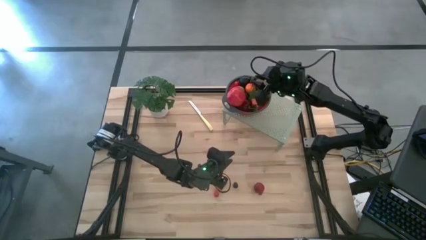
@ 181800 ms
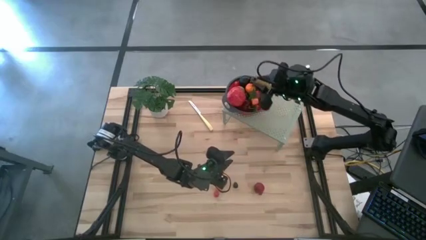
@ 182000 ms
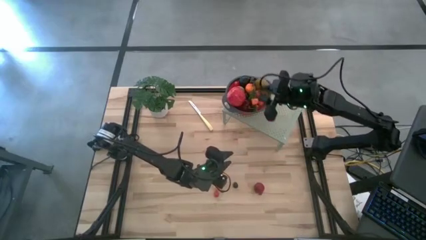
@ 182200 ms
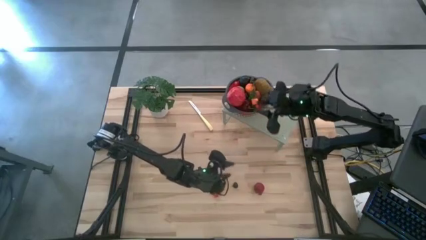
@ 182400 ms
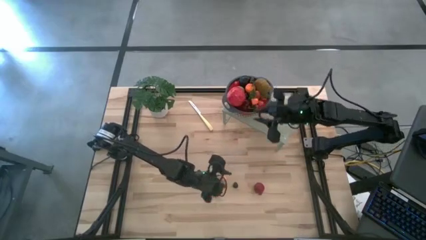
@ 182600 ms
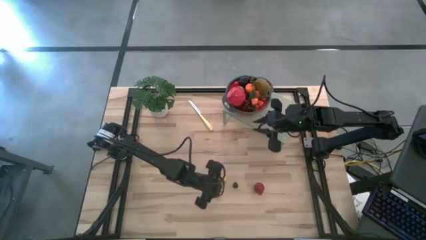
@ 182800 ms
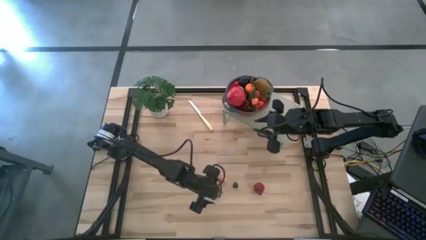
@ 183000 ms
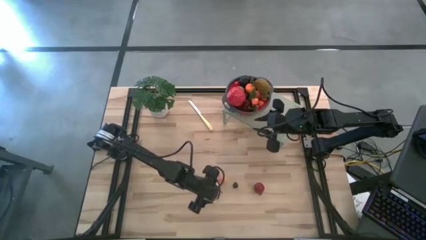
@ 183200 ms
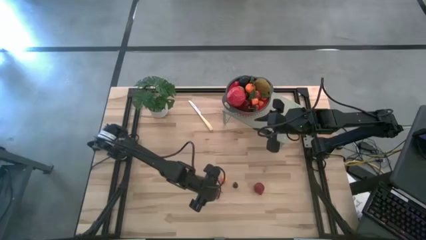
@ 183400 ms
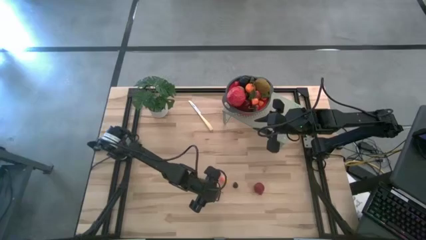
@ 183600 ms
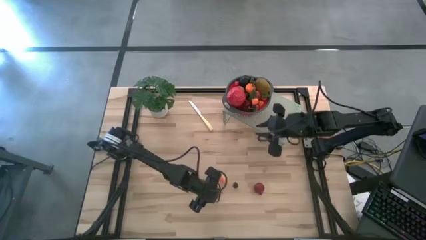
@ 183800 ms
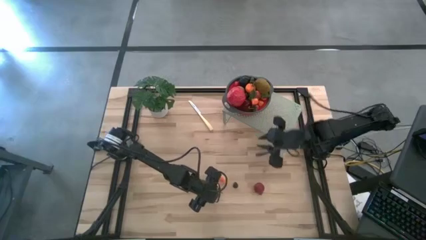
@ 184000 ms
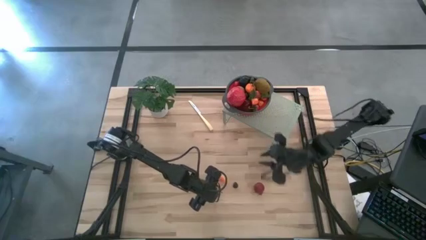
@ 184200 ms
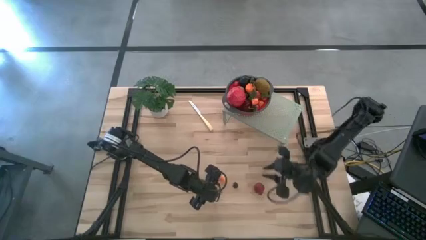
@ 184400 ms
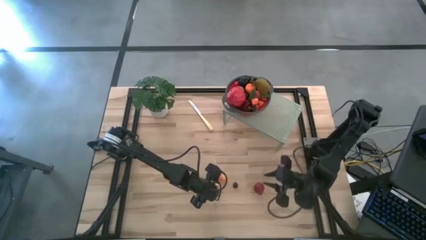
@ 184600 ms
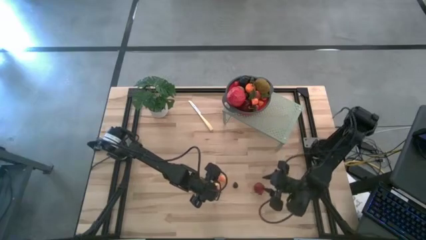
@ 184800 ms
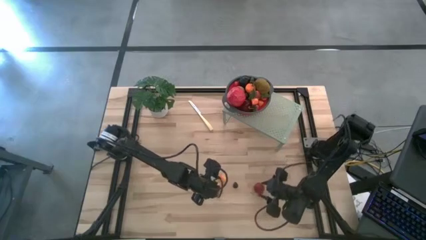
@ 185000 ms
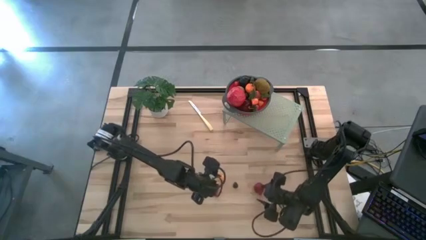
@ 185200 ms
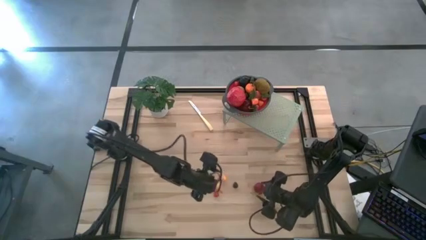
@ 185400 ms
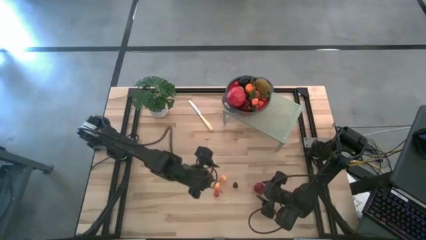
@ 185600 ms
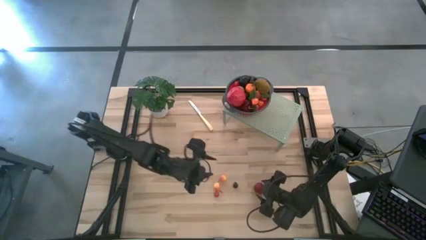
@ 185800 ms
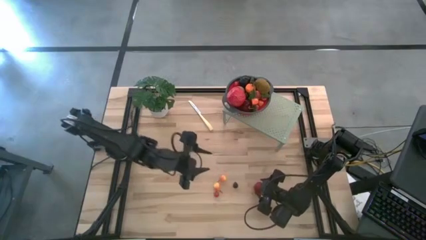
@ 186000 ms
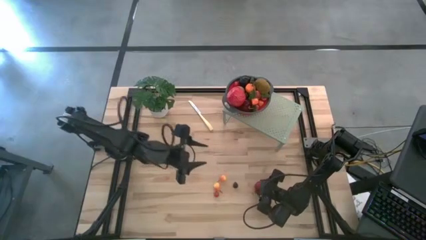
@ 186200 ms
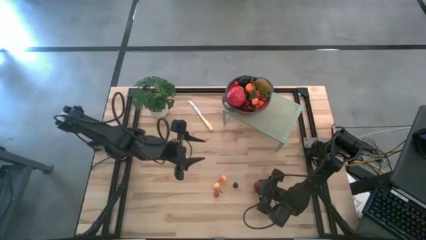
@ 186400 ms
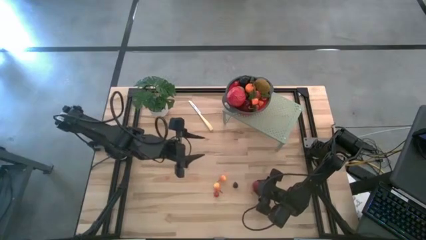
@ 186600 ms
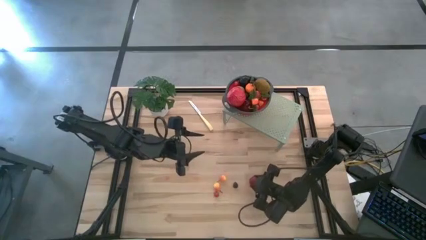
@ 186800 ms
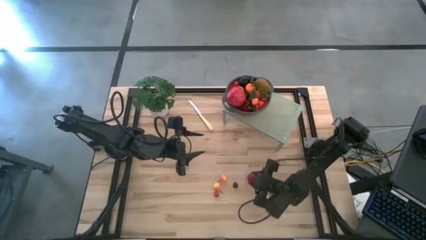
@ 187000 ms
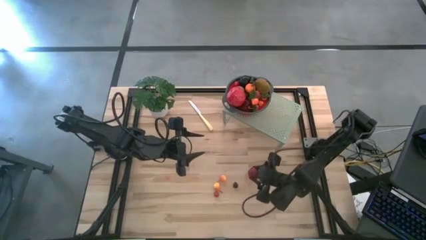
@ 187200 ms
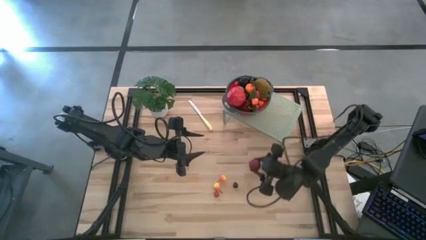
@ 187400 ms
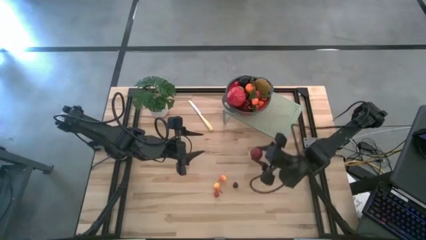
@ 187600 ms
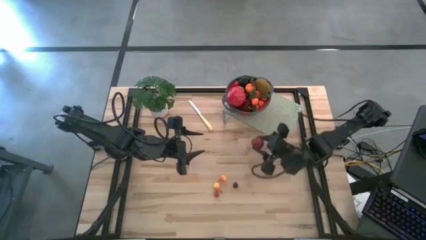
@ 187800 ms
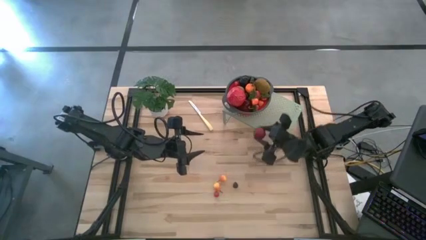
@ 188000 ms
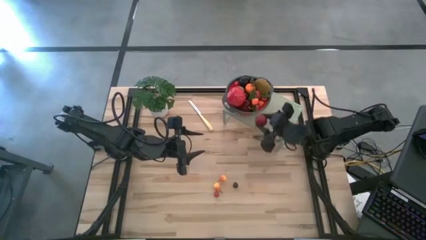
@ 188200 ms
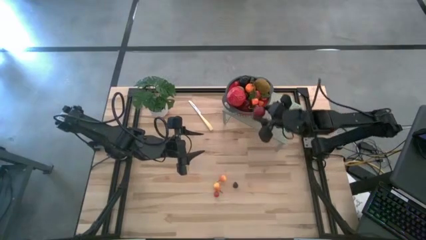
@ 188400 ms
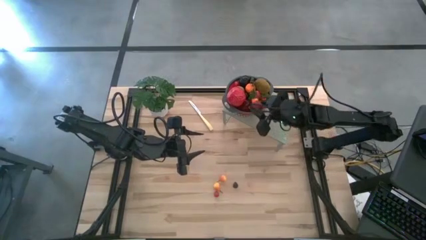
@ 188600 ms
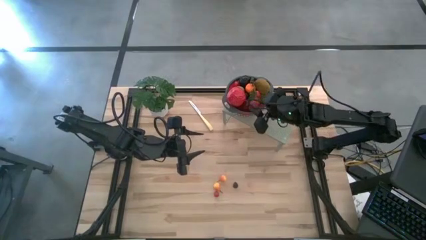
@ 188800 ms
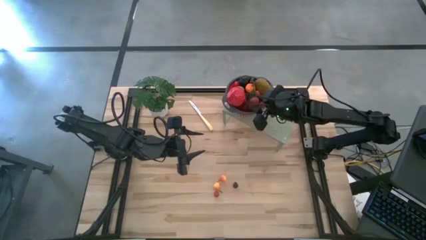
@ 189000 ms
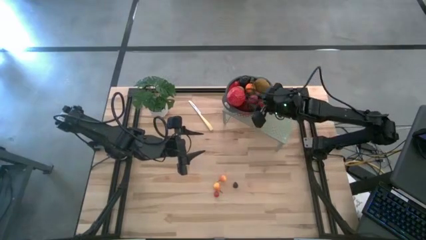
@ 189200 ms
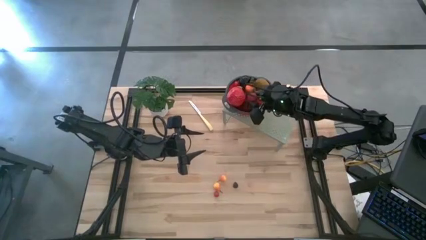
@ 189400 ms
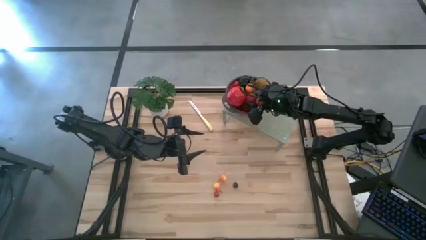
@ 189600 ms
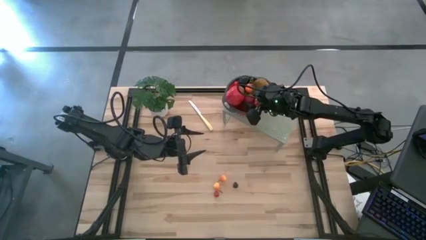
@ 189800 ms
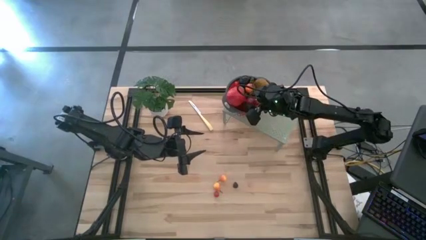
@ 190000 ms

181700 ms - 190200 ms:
Task: Pick & Place Fruit
Put the pomegranate into the red gray colander on the shelf

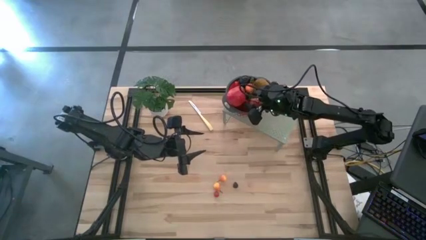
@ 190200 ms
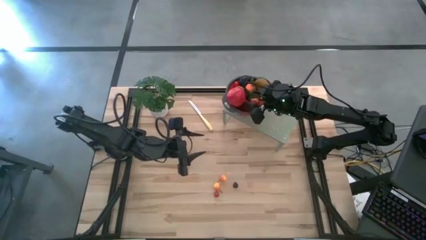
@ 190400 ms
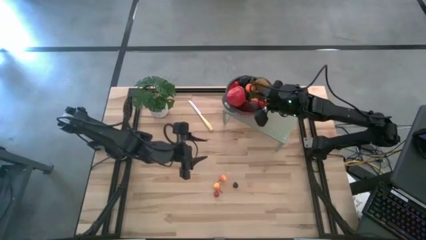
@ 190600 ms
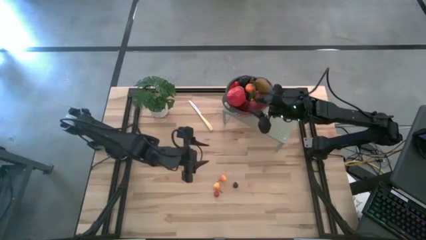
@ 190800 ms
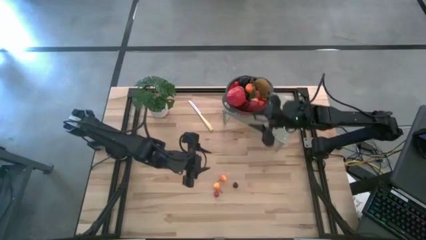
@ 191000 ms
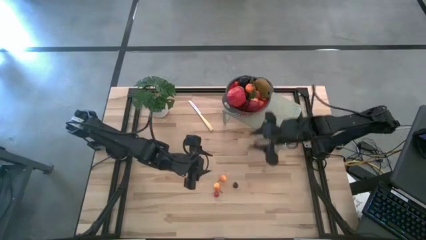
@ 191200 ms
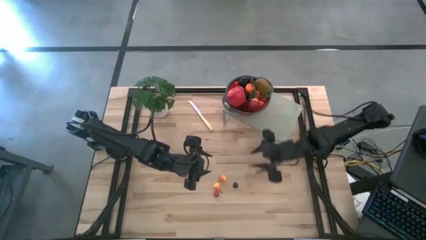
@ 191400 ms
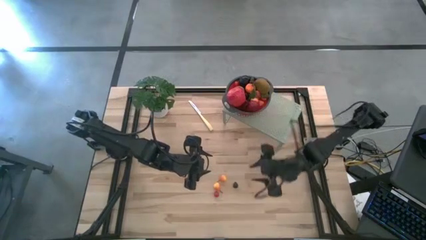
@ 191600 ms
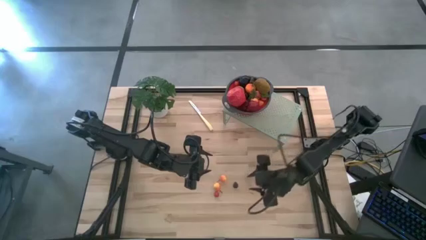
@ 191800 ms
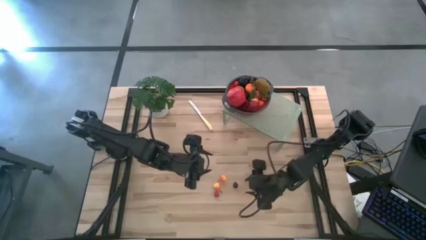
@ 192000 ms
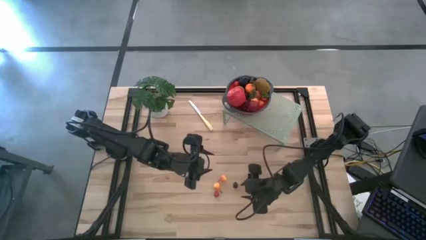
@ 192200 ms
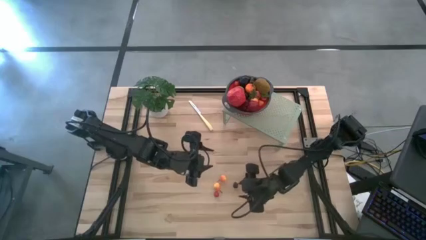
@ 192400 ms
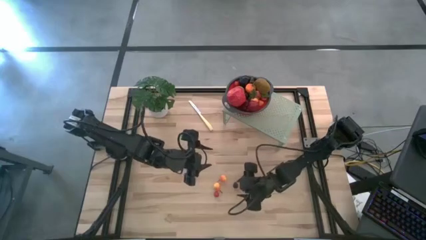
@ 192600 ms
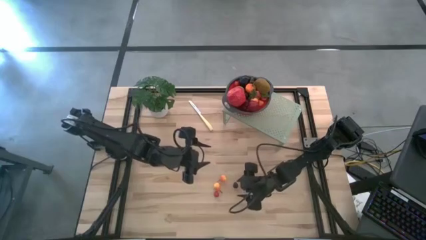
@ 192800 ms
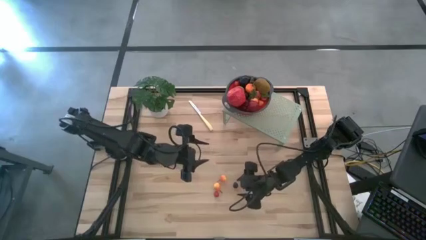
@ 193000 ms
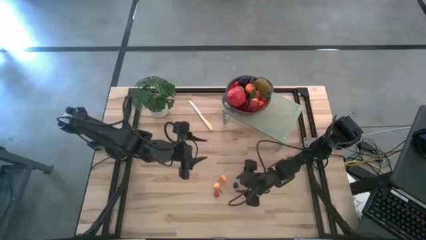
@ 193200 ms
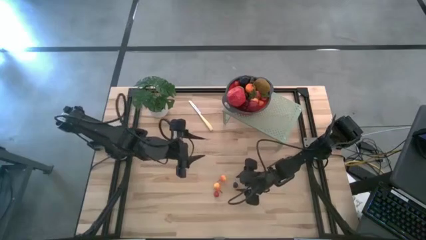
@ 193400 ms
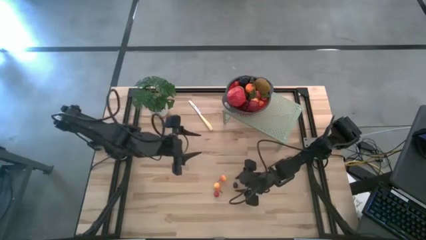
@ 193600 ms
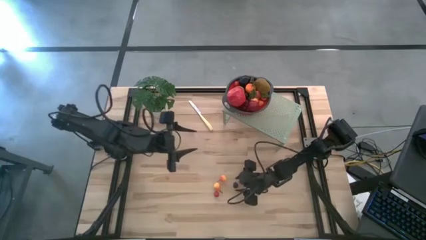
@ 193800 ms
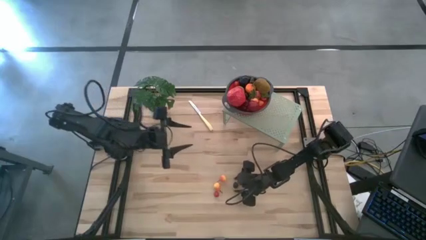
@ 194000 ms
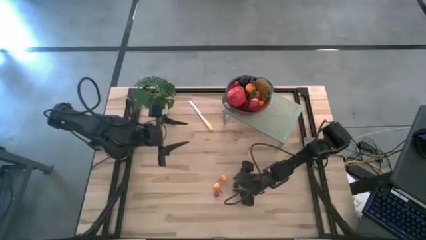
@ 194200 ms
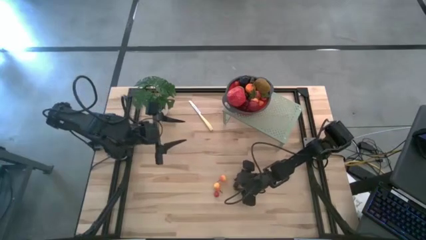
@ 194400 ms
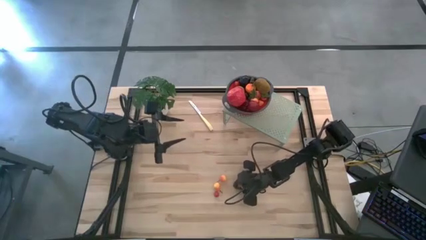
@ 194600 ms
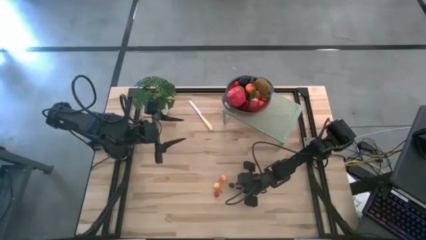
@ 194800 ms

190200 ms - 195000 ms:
Put the blackberry into the red gray colander on the shelf

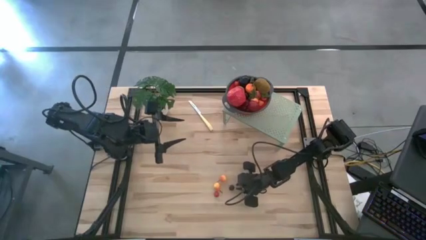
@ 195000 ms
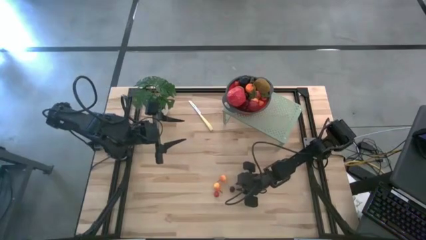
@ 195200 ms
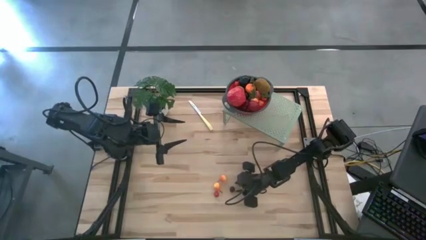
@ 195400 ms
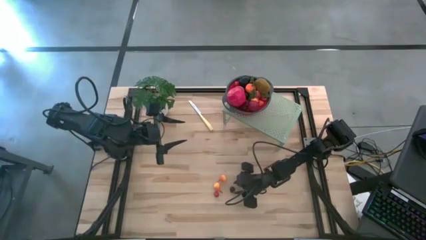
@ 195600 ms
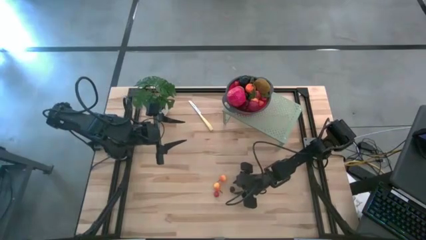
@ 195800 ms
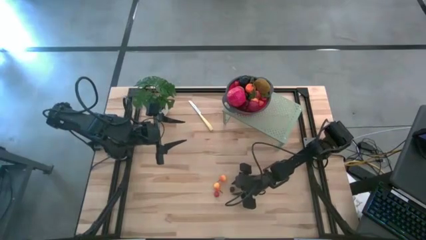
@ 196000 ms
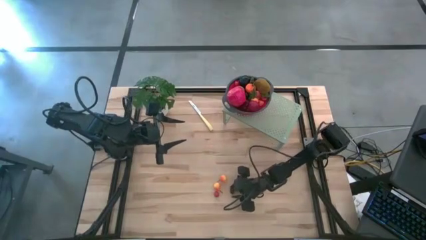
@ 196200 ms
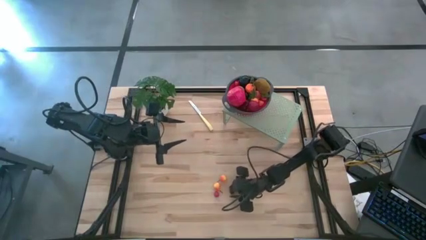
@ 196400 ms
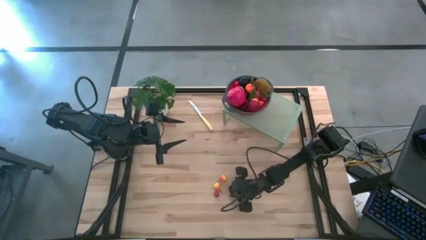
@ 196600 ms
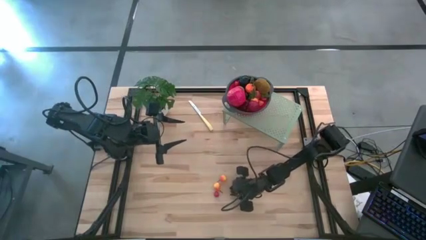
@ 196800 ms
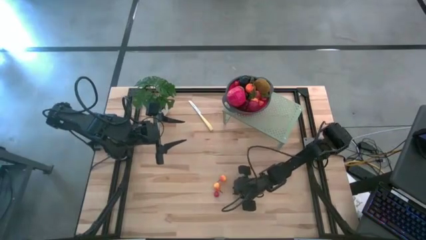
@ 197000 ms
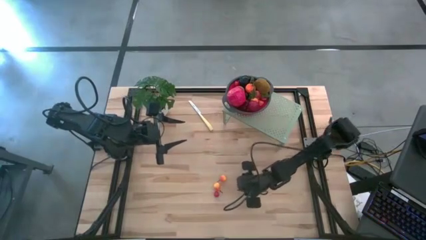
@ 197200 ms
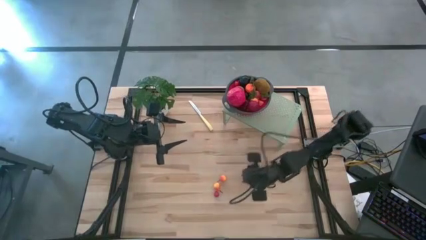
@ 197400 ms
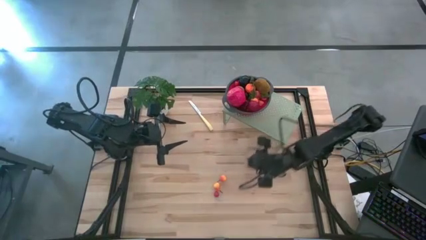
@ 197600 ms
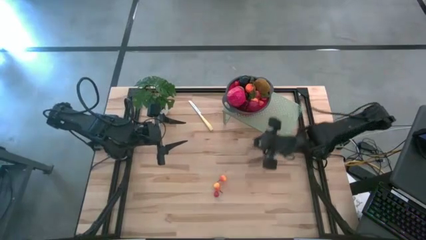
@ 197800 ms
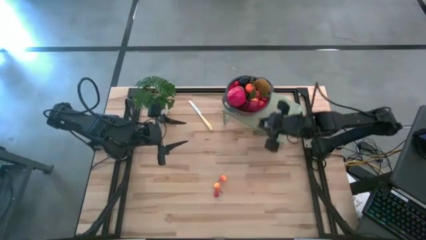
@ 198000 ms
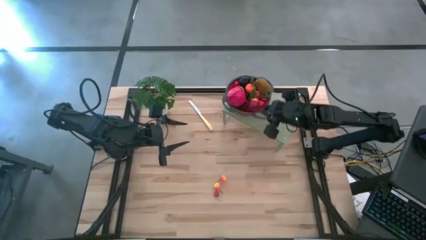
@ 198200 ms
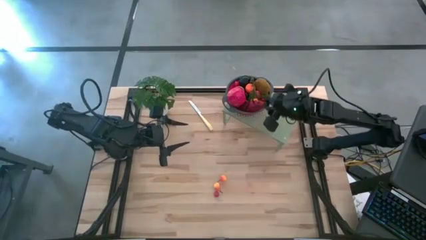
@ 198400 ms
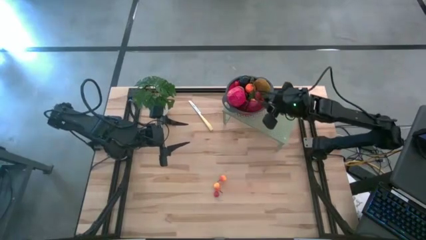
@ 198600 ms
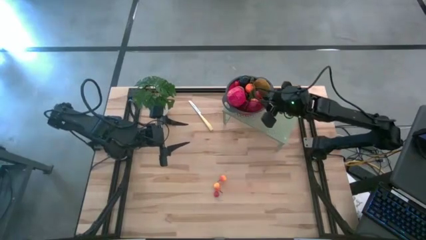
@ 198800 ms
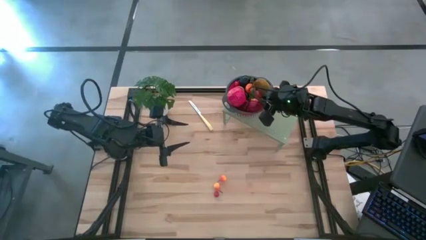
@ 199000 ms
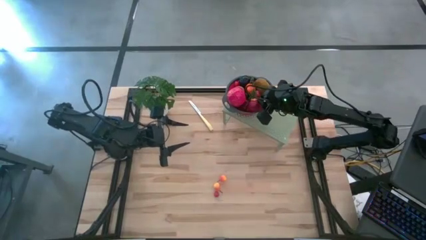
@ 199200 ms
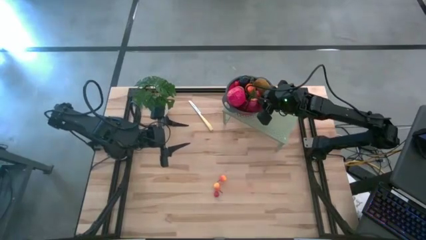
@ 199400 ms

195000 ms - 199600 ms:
Put the blackberry into the red gray colander on the shelf
